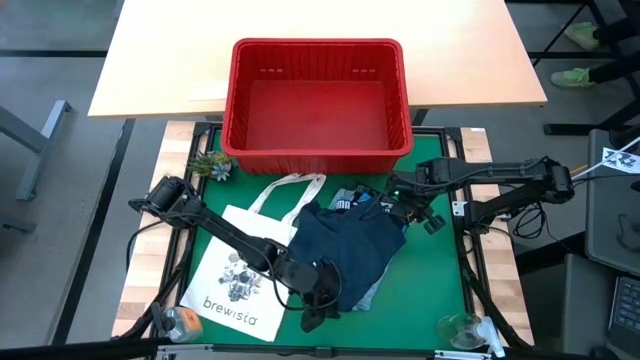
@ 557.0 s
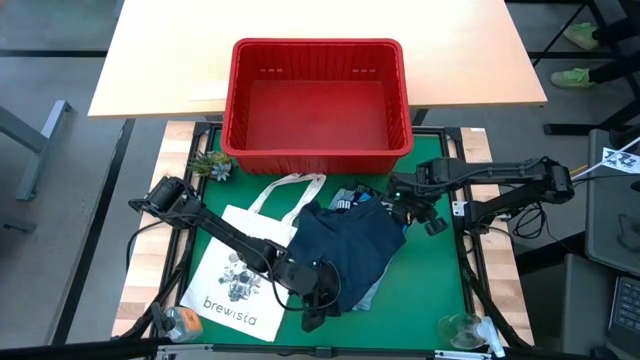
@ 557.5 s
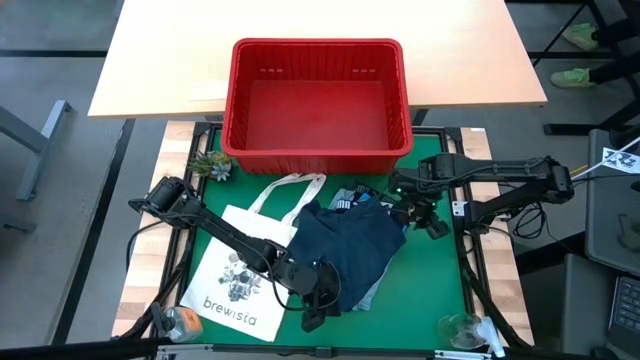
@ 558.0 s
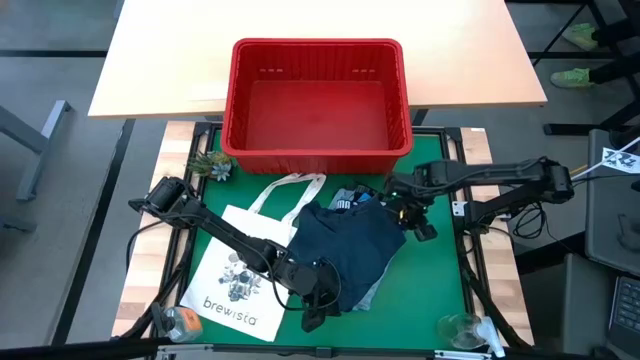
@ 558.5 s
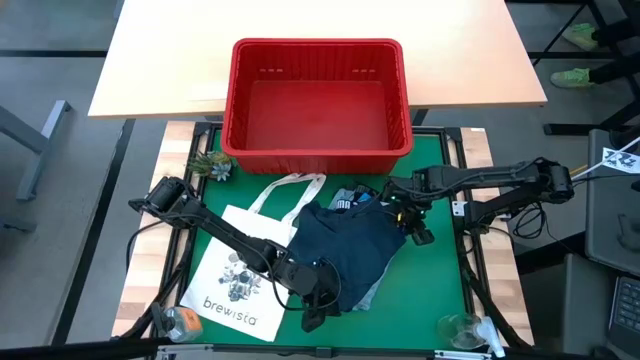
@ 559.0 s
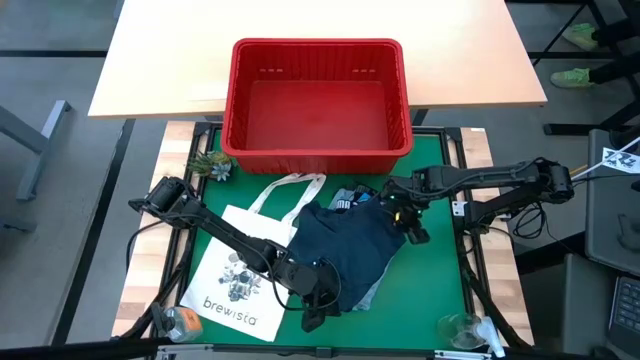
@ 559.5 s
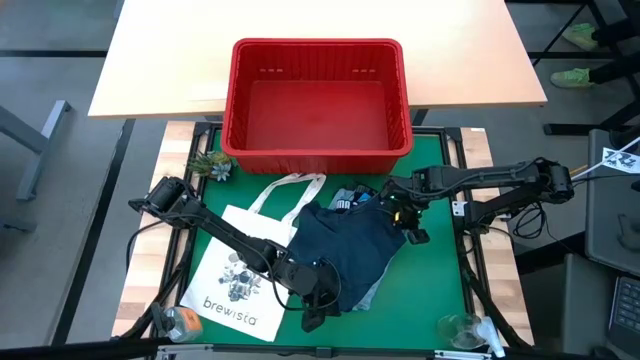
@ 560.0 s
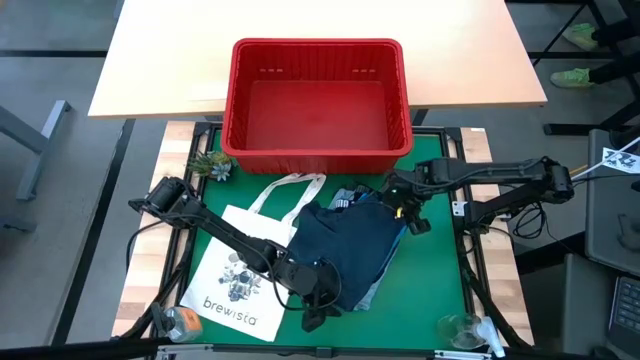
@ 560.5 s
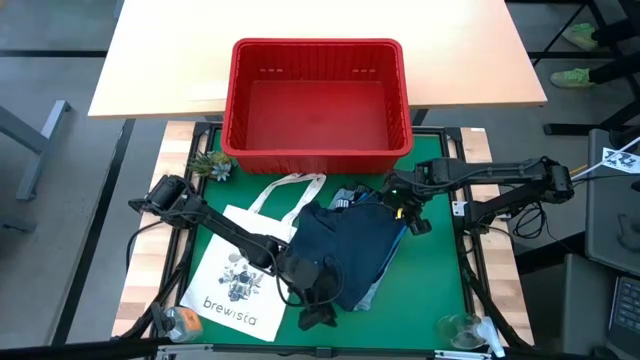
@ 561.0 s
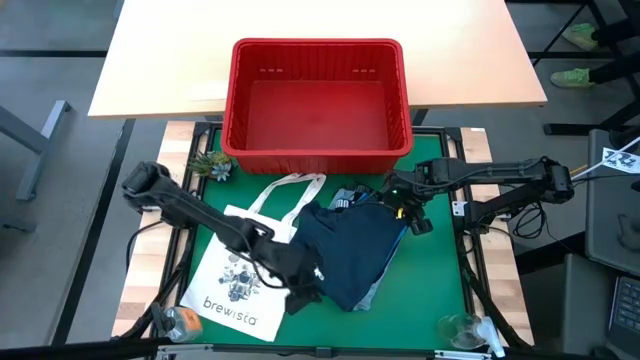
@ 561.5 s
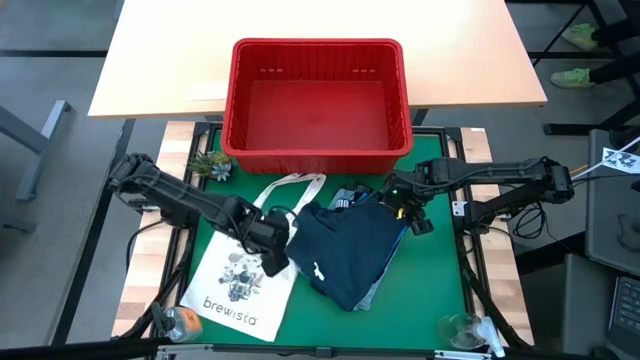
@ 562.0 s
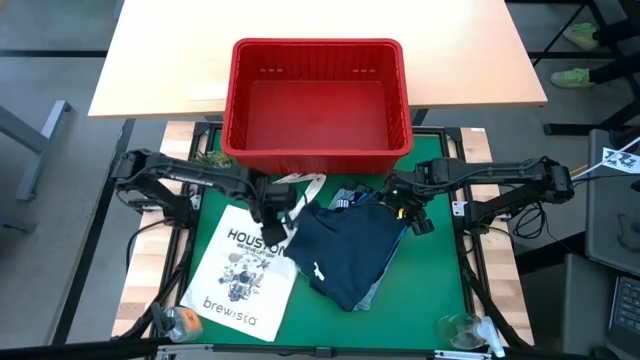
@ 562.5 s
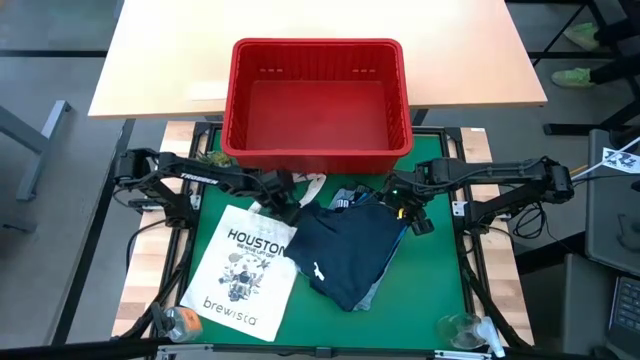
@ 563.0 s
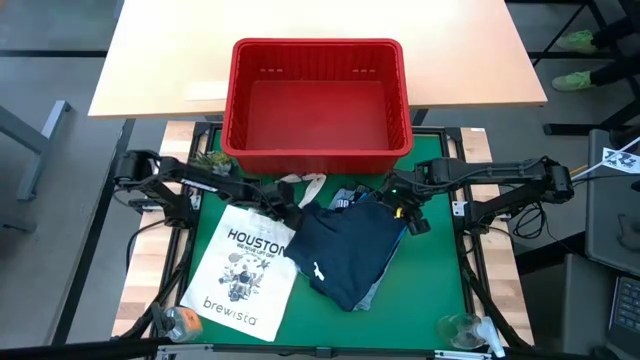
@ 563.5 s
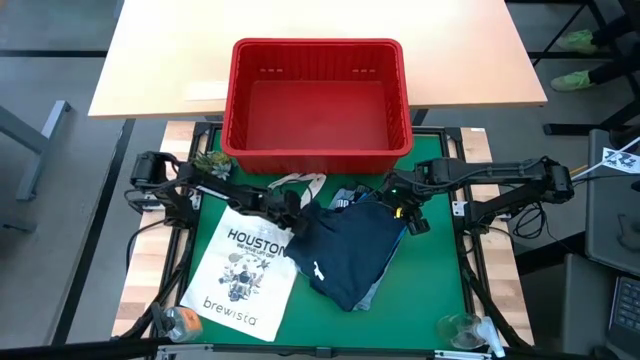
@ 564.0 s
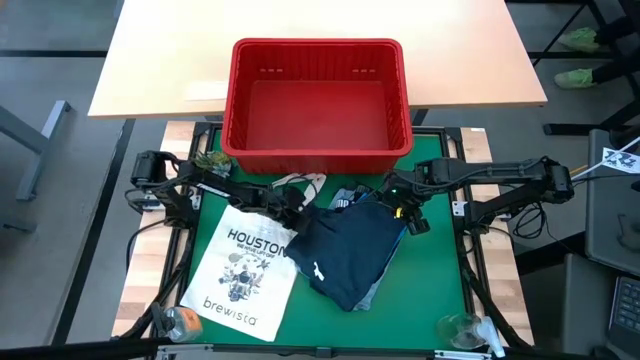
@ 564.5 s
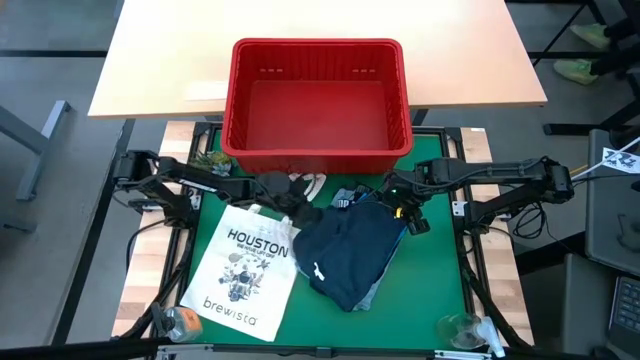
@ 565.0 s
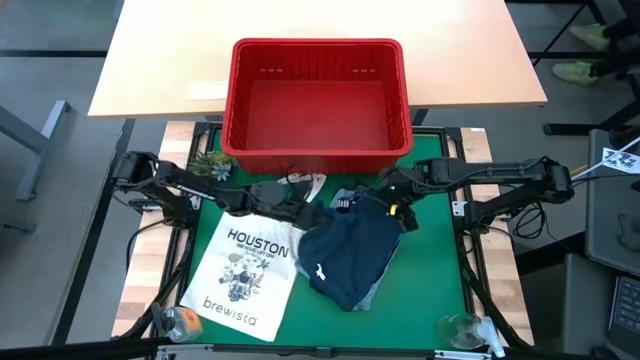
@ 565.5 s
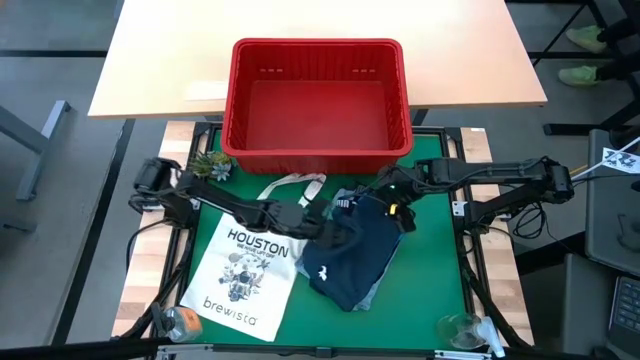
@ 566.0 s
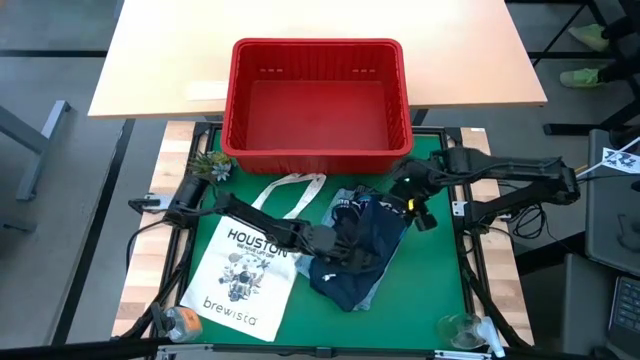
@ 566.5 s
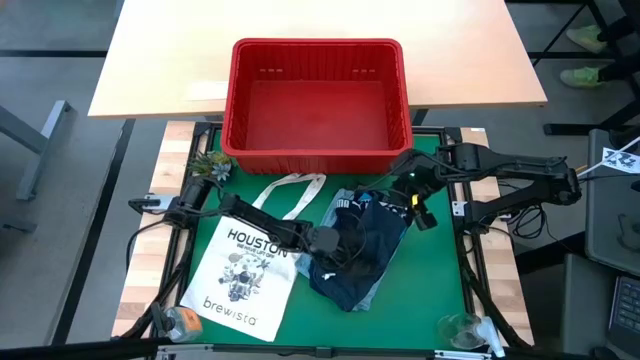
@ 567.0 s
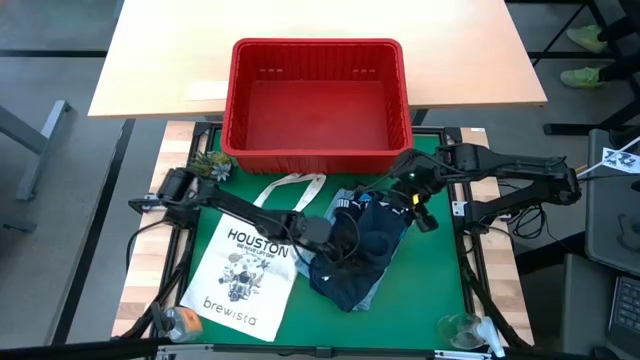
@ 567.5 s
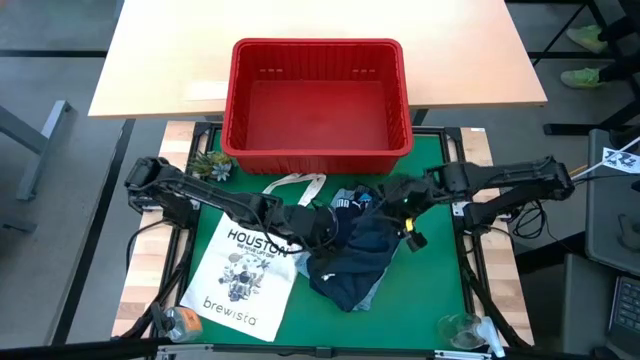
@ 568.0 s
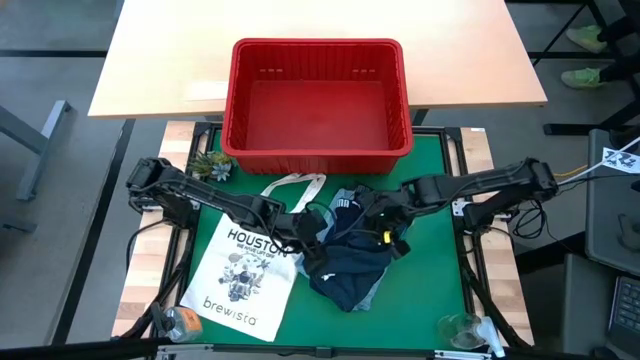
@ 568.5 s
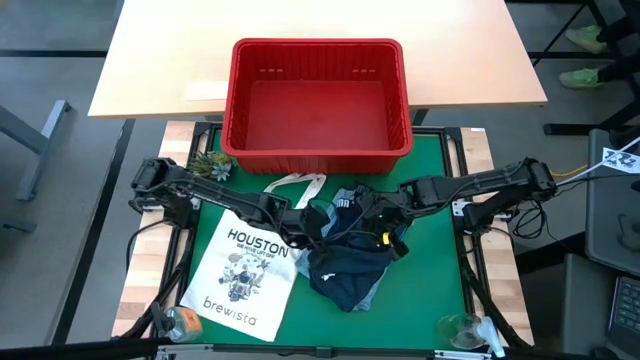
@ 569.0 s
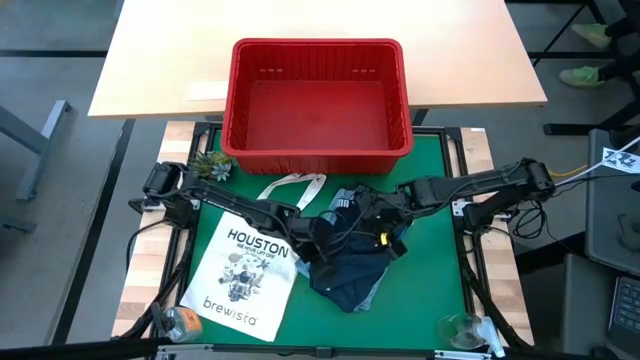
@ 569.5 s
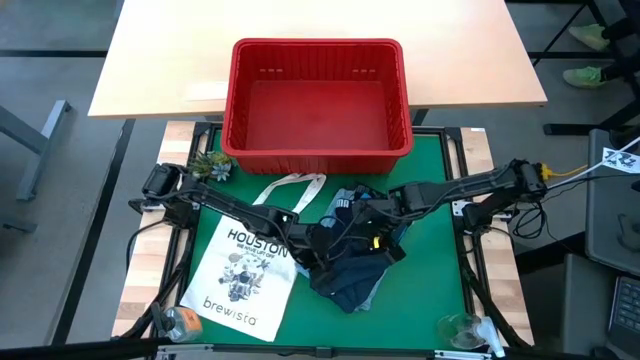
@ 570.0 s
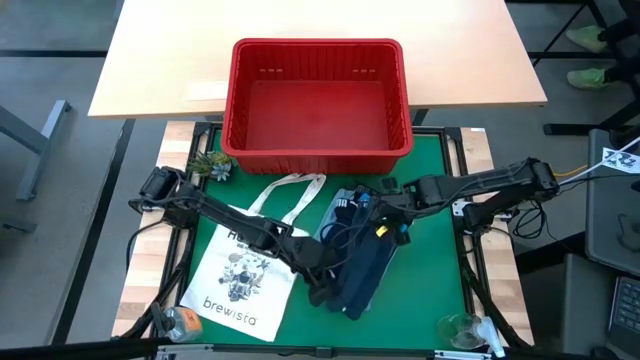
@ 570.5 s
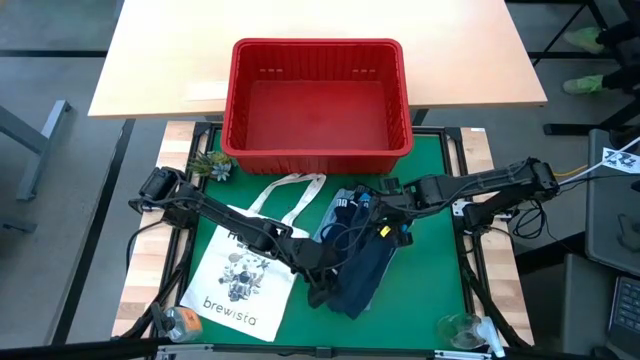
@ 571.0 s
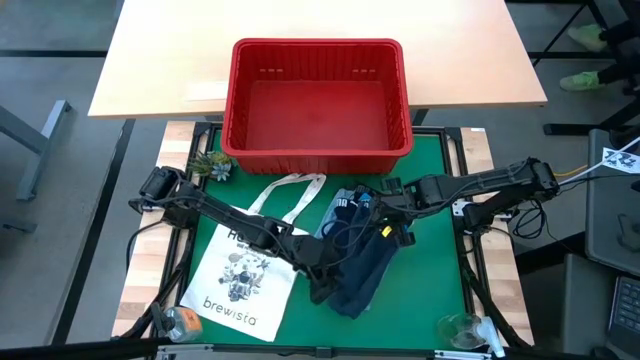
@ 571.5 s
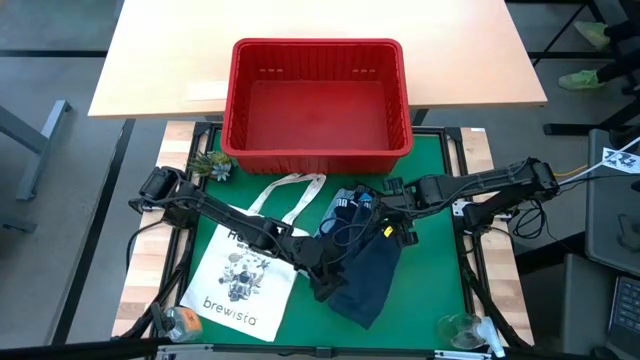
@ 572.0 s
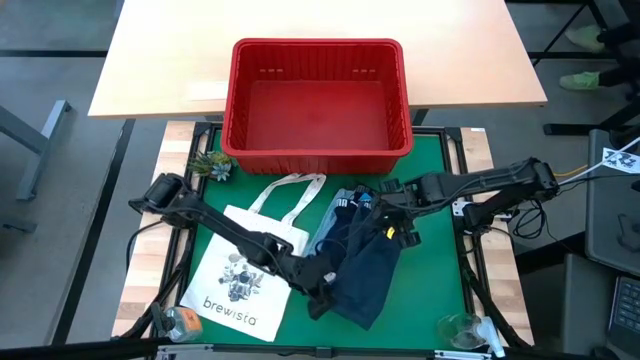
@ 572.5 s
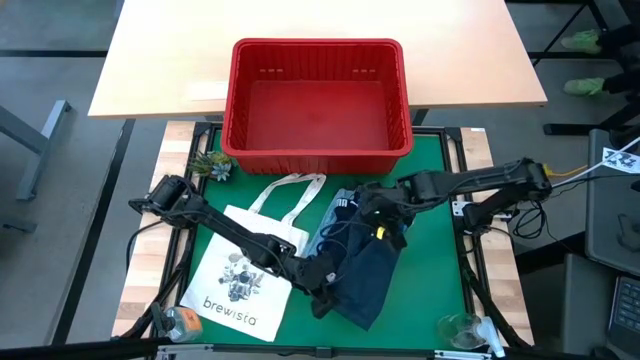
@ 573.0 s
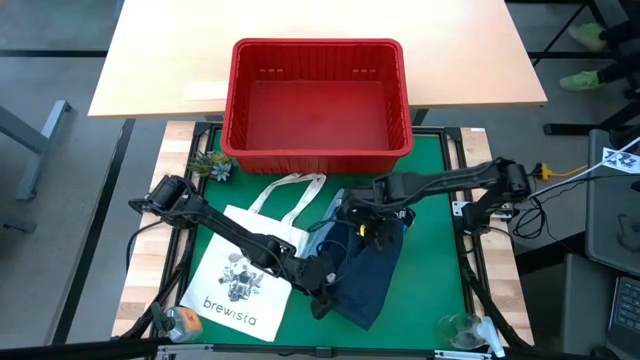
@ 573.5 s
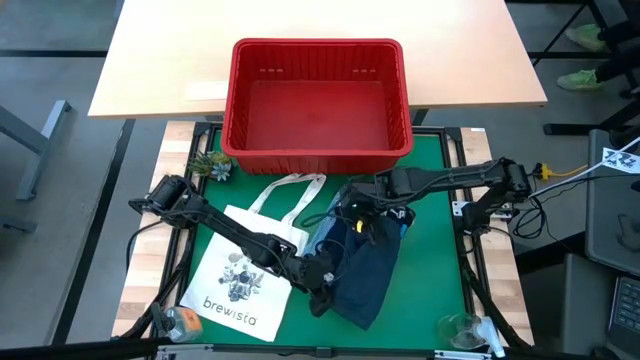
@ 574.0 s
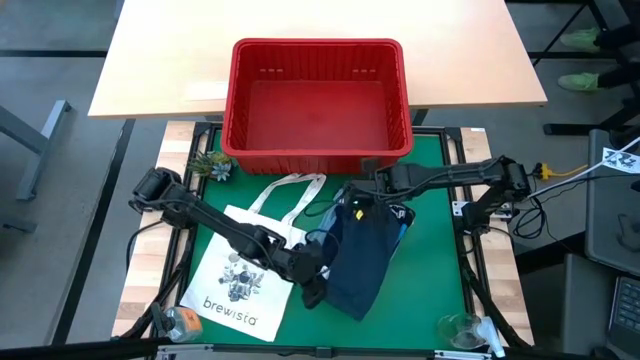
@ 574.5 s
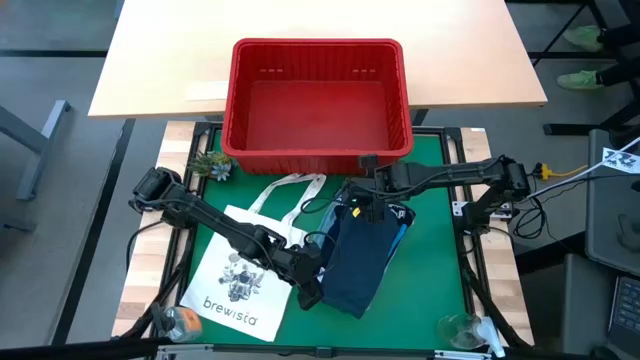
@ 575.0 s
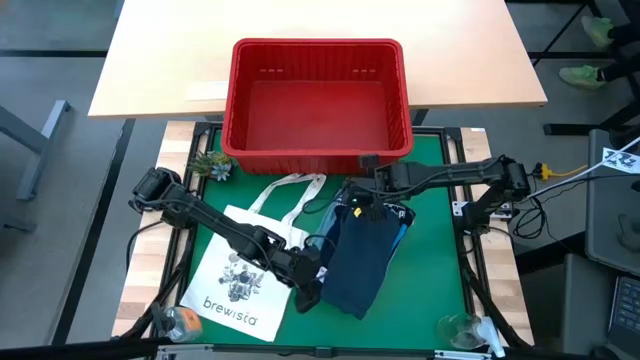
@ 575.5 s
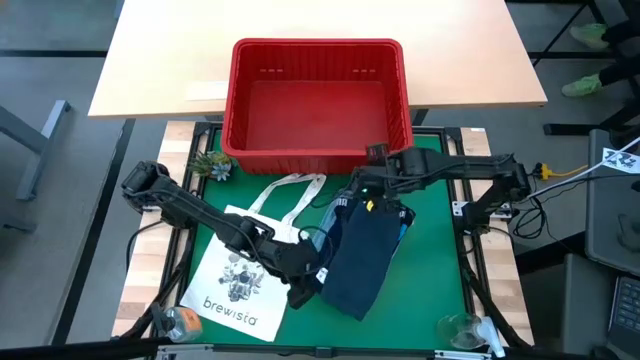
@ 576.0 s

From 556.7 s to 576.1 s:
Task: Fold Laundry from Bin
Fold the gray short
